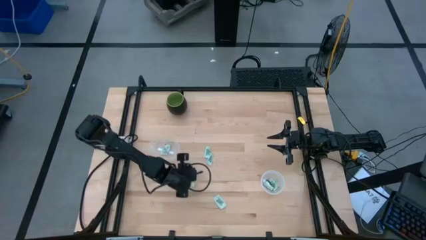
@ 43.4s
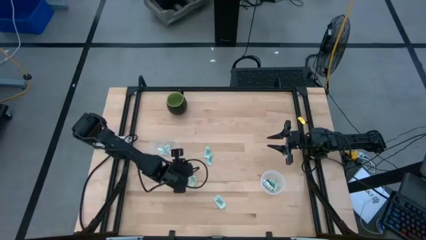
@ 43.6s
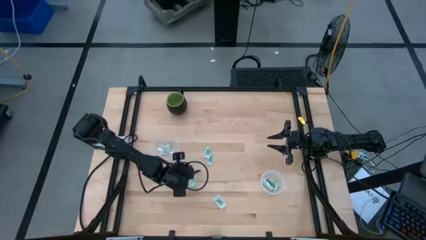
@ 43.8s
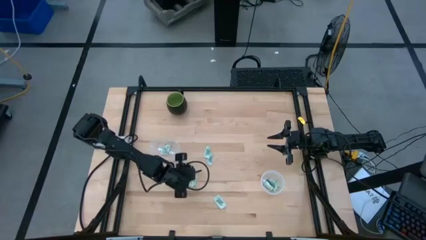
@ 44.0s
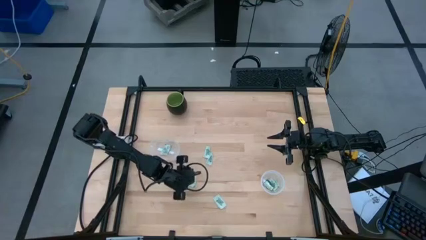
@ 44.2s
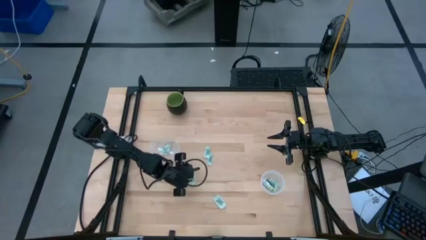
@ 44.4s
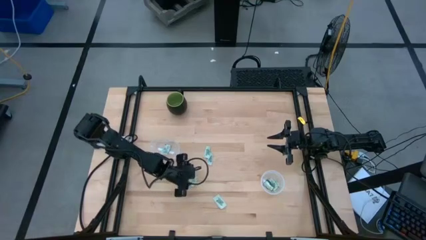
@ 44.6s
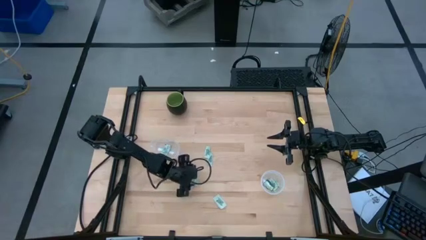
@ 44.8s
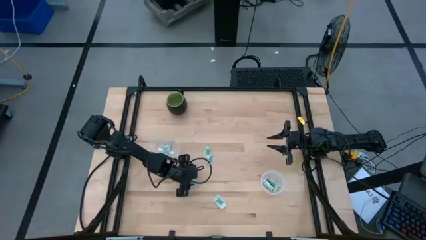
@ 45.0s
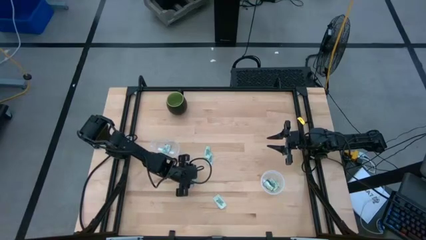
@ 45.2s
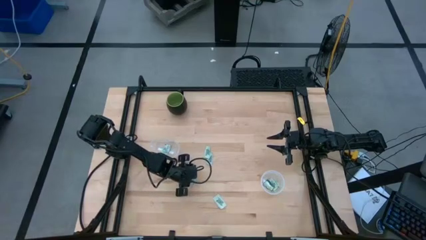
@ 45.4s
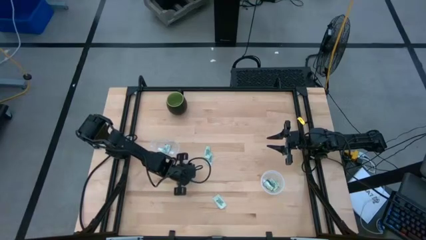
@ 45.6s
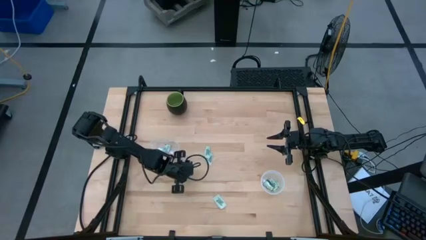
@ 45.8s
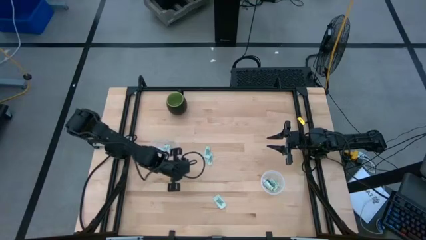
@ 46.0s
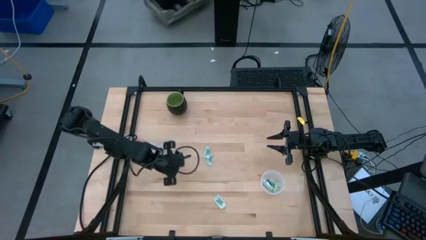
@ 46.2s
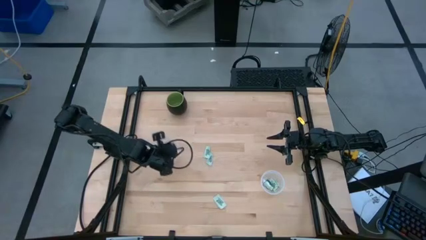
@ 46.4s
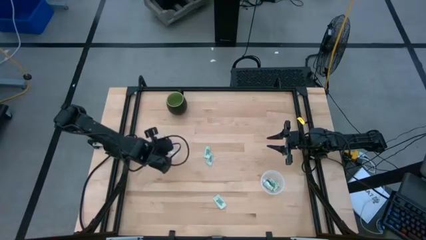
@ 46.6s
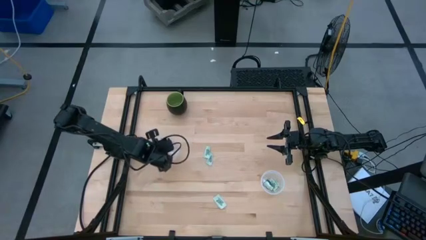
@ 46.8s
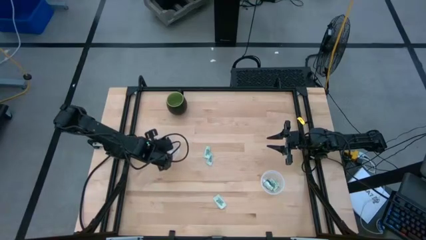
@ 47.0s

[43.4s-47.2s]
Task: Pick and place Stevia / Truvia into bins
Put the white stevia packet into the left transparent container

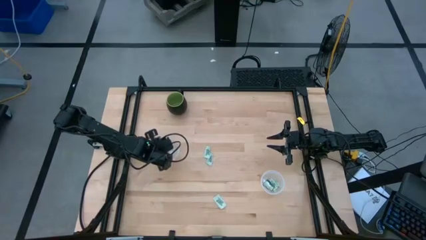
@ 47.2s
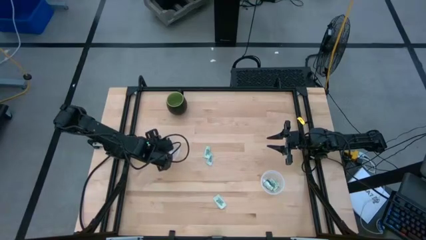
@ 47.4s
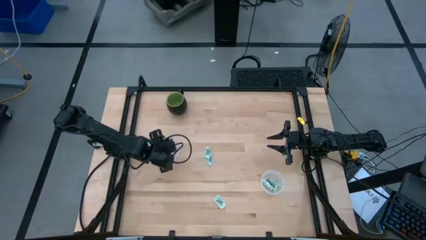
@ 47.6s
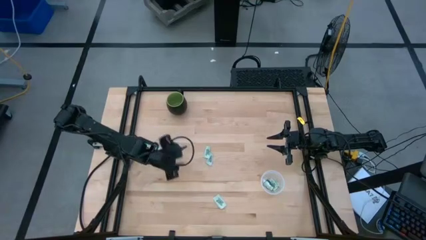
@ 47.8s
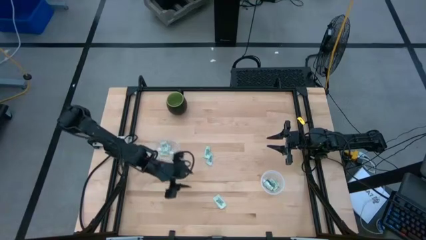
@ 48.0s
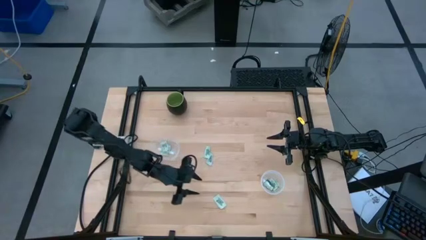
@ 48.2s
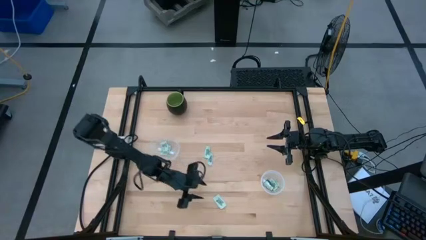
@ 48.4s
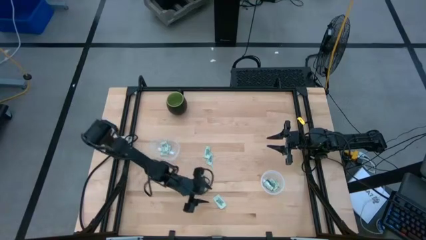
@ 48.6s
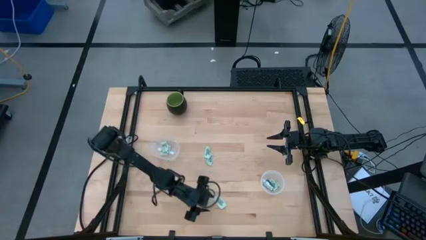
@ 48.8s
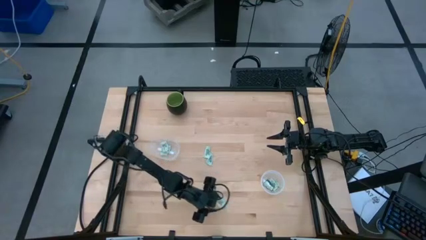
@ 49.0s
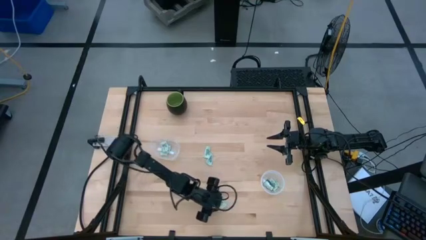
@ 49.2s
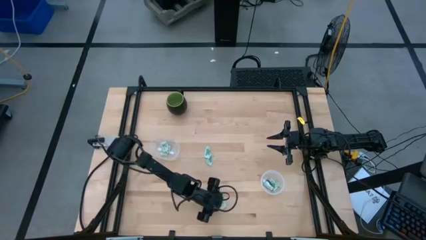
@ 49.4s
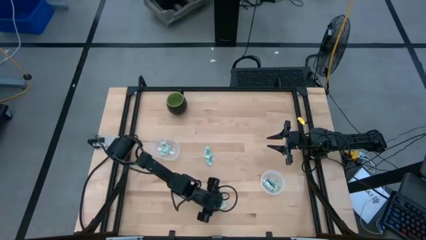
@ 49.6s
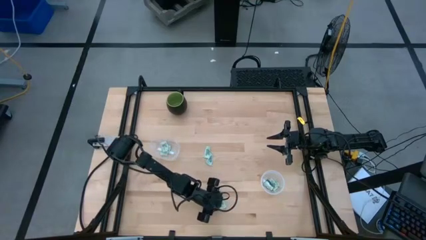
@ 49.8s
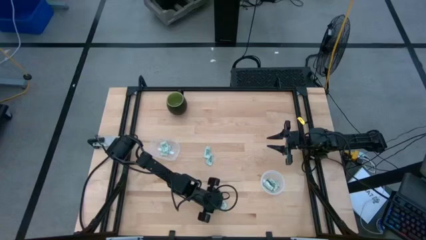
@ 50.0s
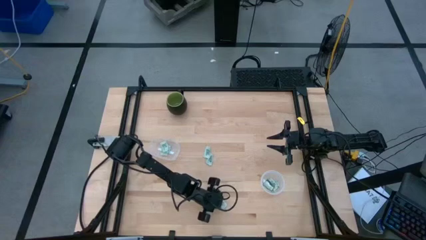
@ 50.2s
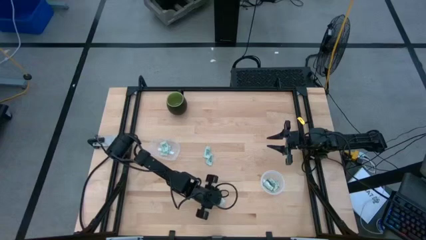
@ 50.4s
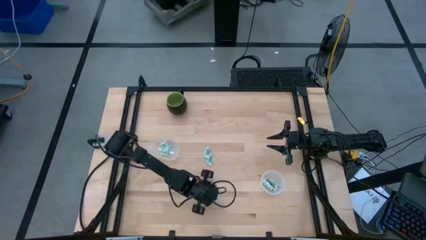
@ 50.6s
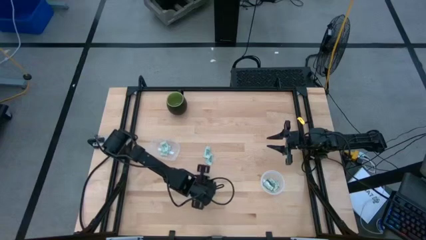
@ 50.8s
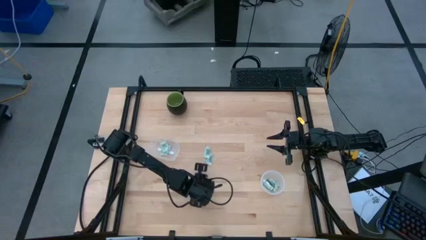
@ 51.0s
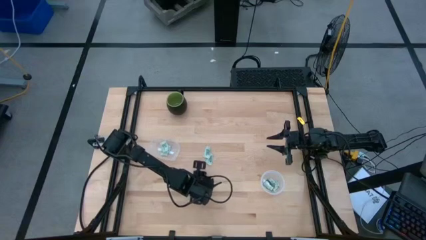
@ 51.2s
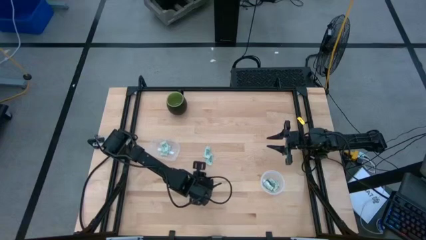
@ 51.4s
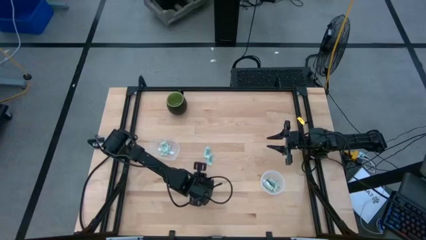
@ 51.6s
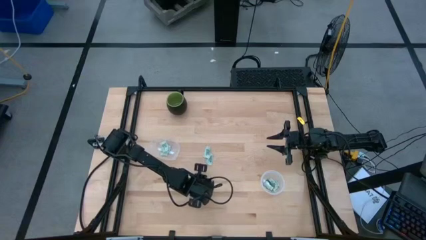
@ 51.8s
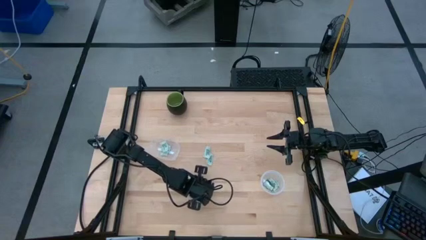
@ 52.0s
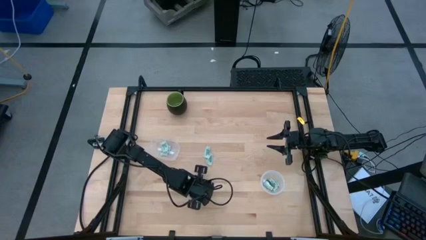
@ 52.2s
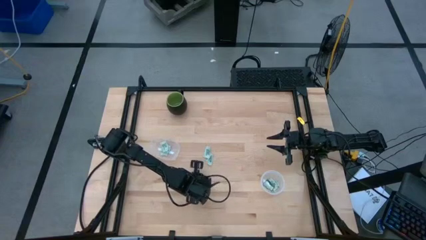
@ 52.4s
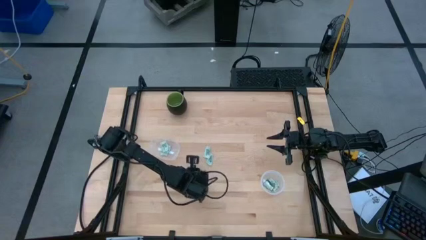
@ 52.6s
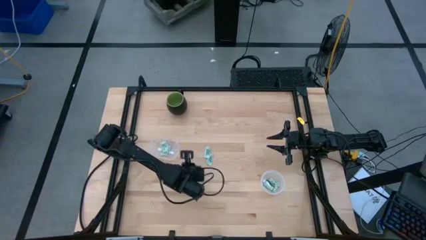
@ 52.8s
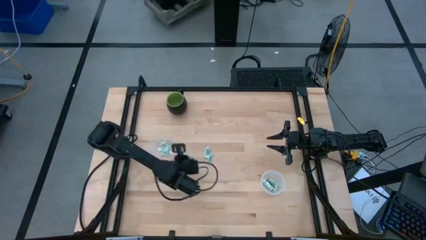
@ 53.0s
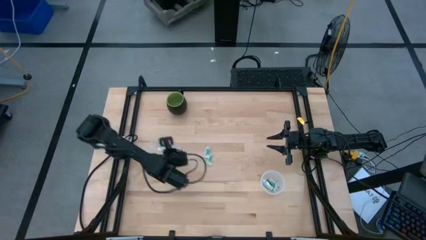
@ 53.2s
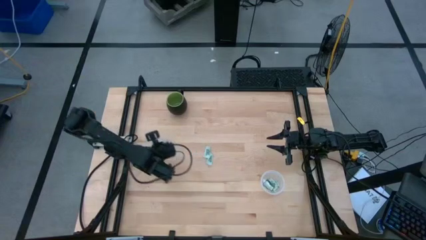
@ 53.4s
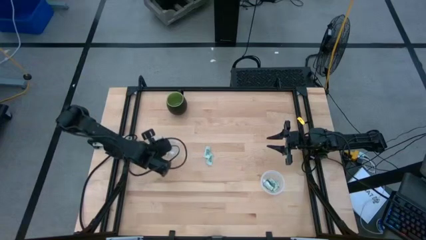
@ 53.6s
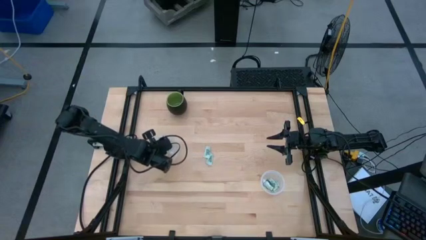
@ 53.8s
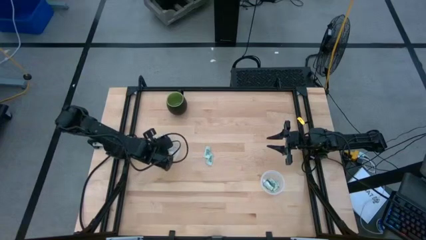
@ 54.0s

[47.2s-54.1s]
Put the bottom white stevia packet into the left transparent container

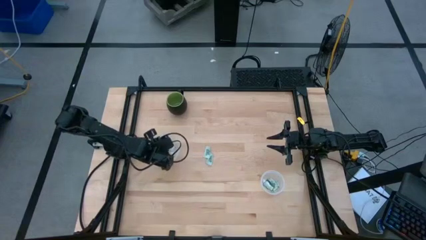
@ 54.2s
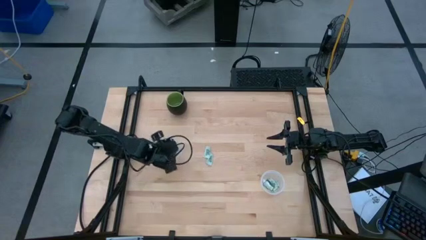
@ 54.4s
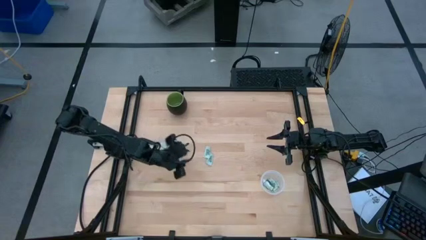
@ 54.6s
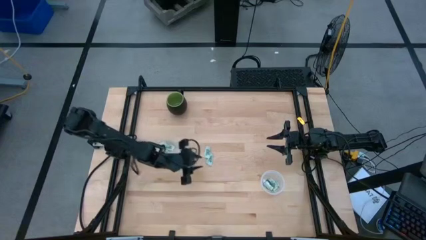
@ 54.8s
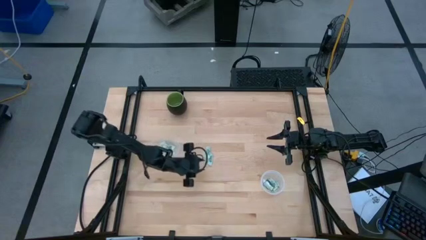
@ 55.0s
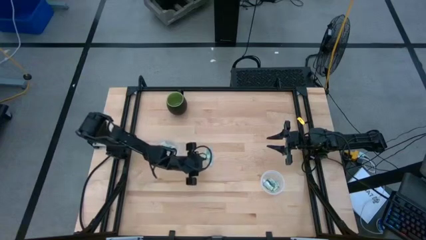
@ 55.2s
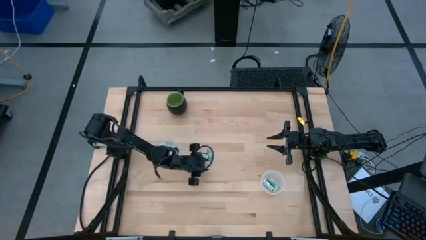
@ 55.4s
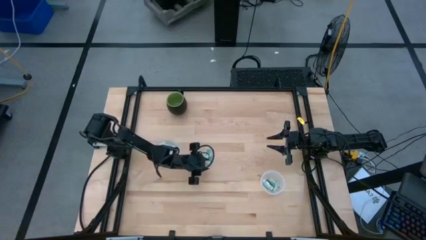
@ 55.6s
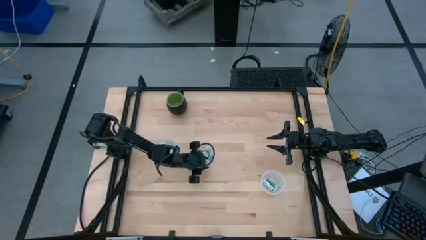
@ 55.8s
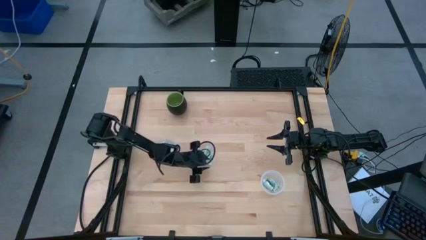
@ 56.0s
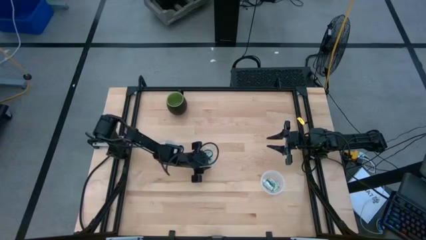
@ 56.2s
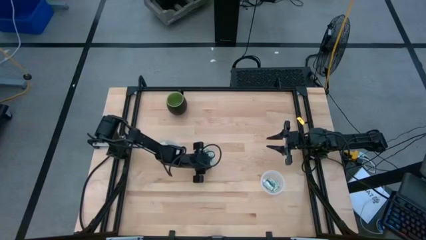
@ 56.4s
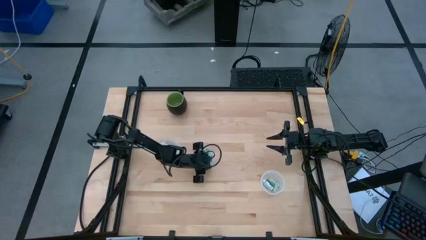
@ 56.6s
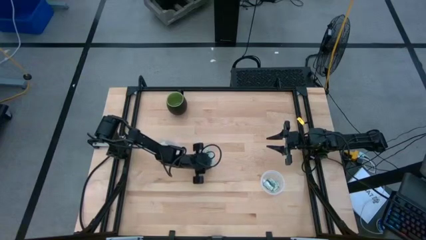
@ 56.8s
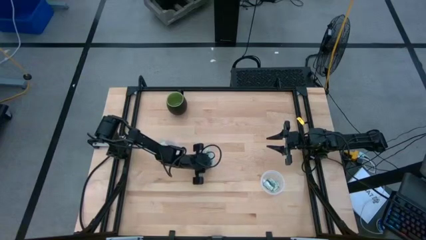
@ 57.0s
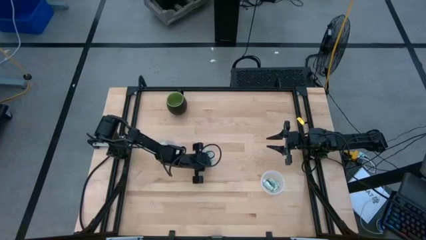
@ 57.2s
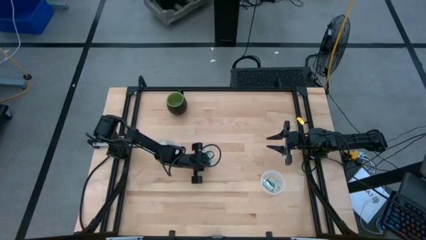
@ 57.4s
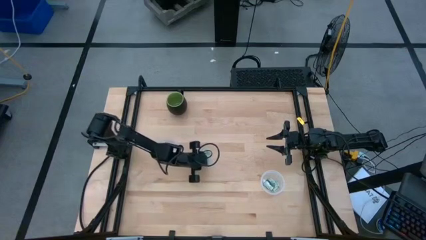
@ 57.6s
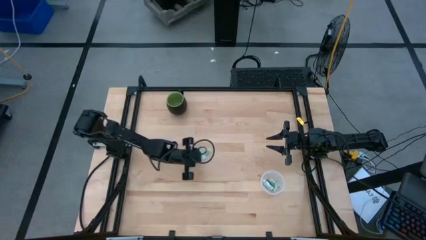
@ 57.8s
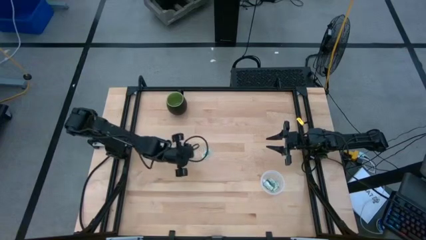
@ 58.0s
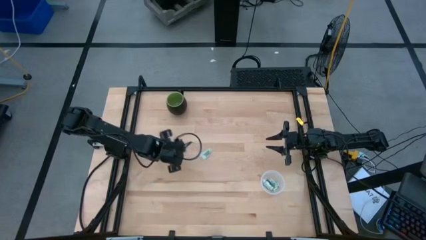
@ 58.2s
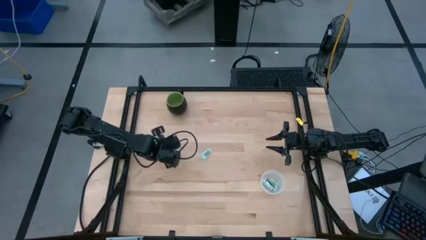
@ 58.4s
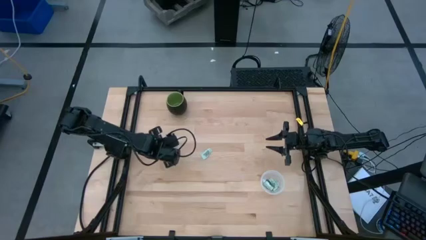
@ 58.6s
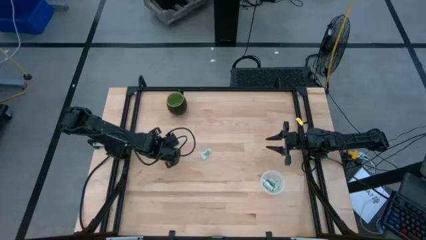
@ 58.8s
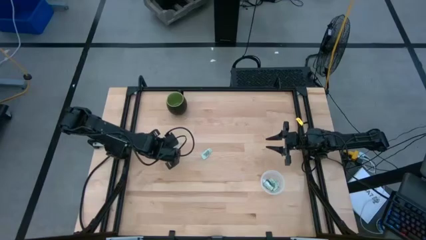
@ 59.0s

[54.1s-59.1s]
Put the bottom white stevia packet into the left transparent container

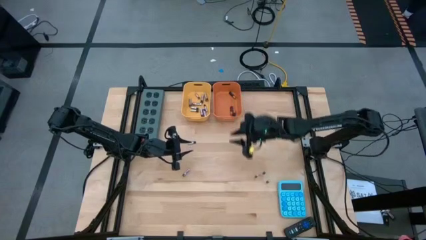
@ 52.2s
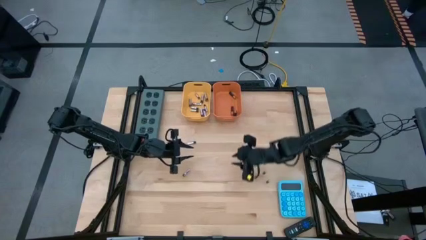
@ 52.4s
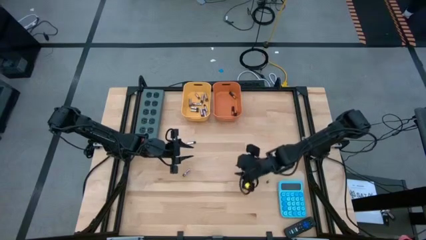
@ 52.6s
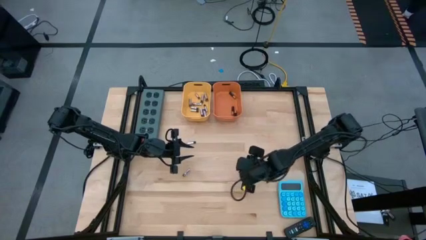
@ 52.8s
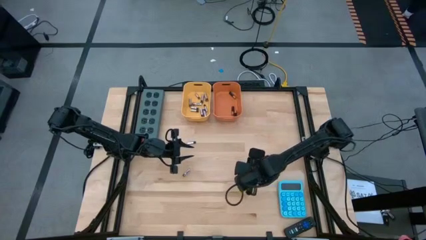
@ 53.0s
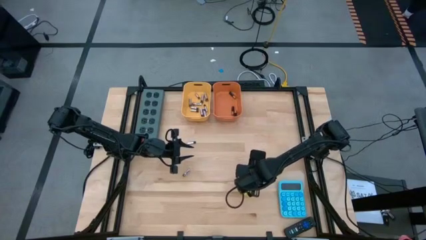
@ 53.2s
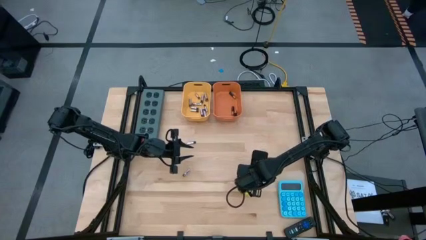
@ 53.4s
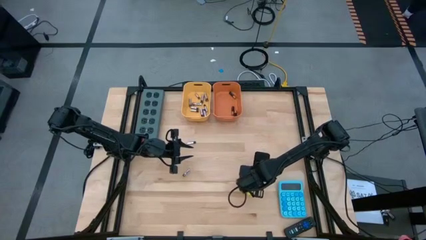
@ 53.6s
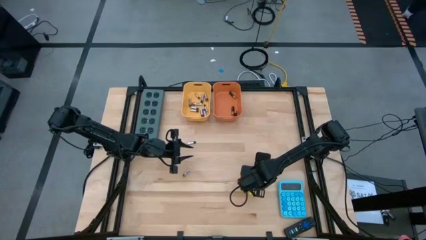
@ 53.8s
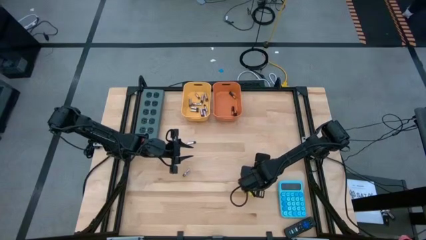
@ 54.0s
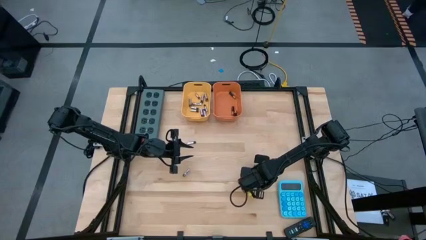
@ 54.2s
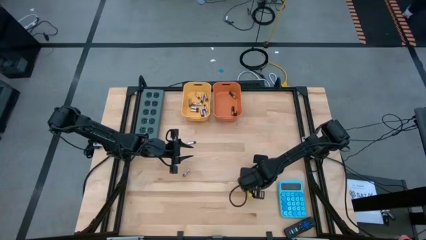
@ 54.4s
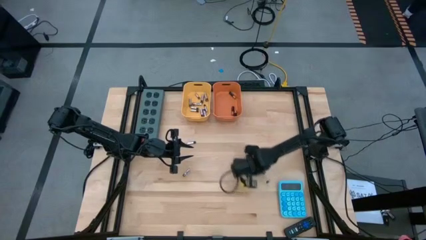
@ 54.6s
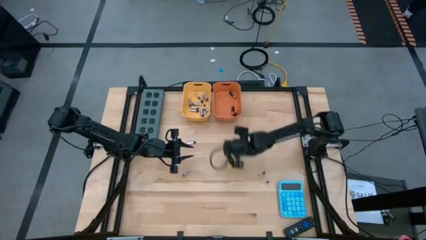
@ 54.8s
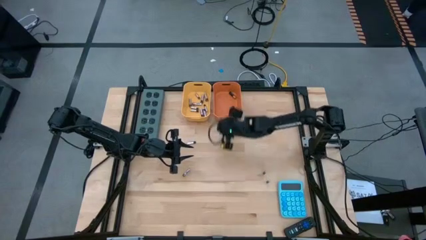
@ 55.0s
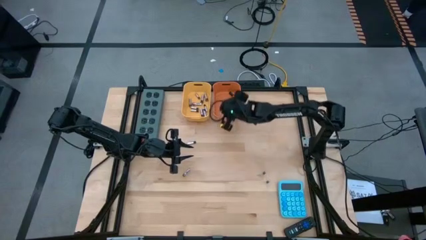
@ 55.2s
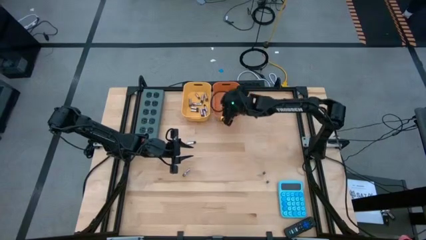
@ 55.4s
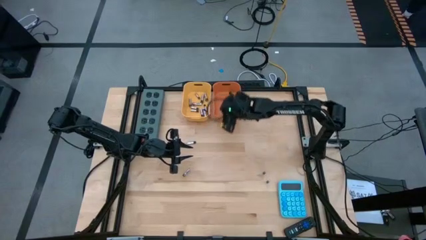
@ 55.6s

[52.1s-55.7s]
Task: Sort batteries
Put the black battery into the orange bin
